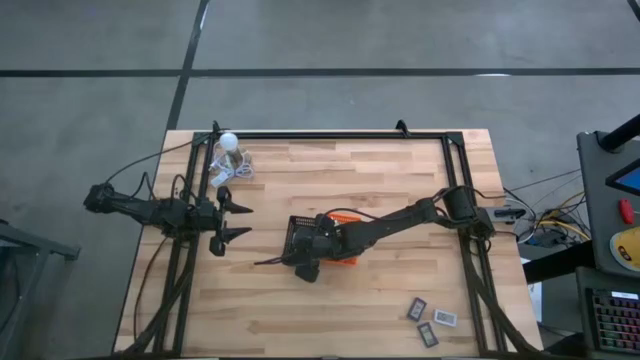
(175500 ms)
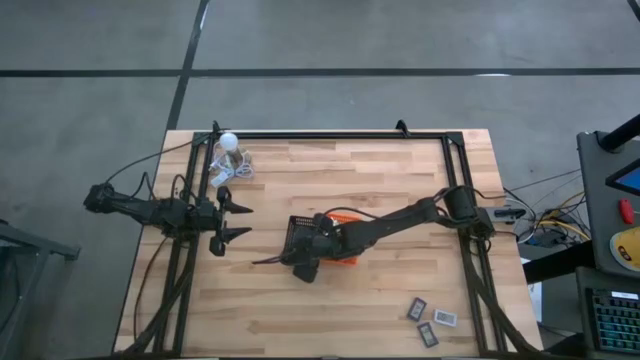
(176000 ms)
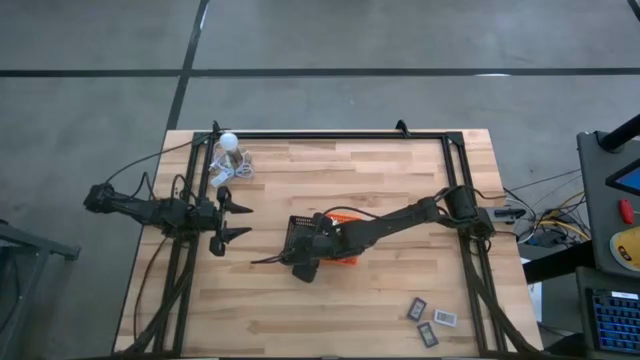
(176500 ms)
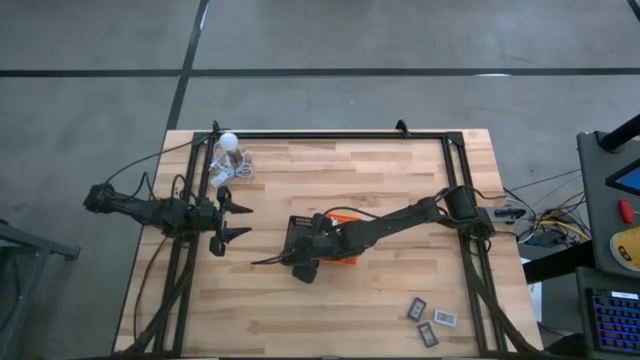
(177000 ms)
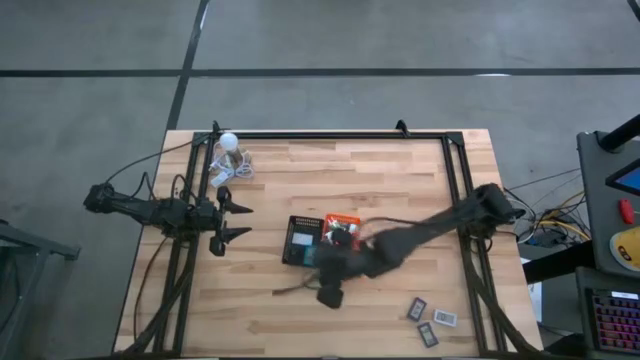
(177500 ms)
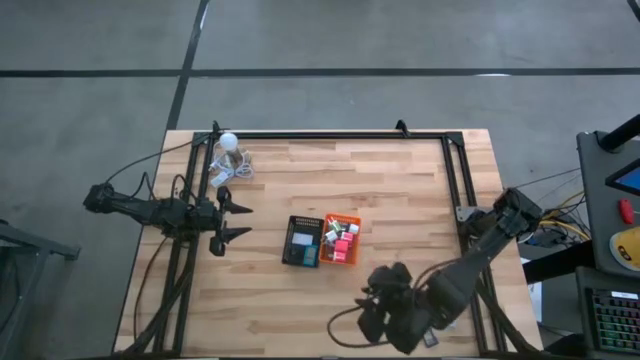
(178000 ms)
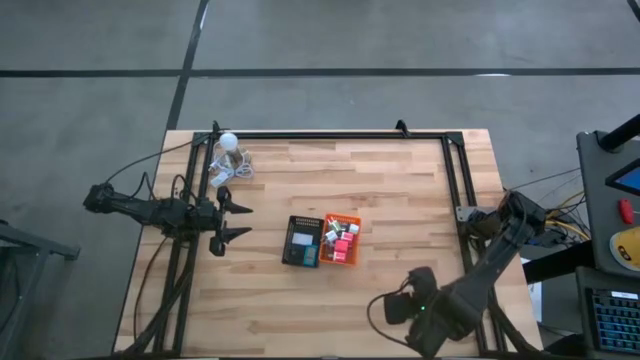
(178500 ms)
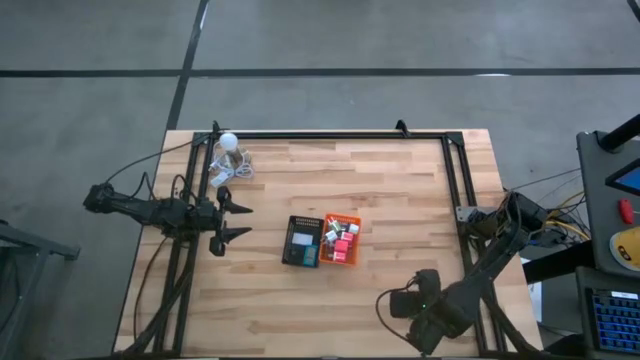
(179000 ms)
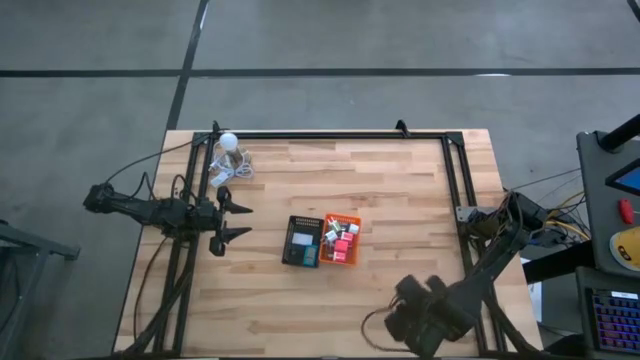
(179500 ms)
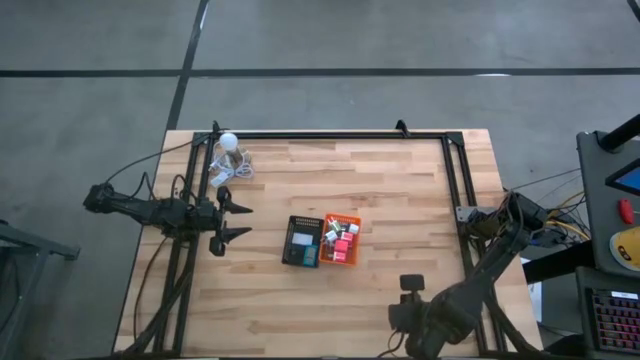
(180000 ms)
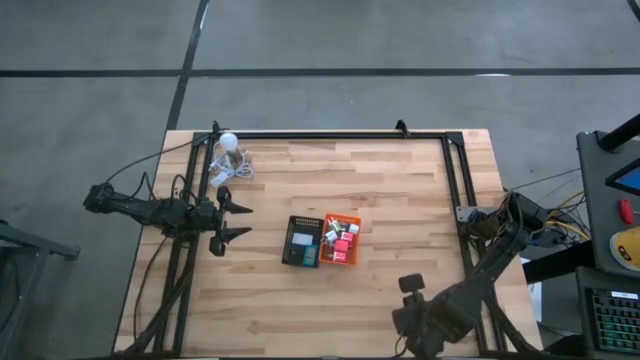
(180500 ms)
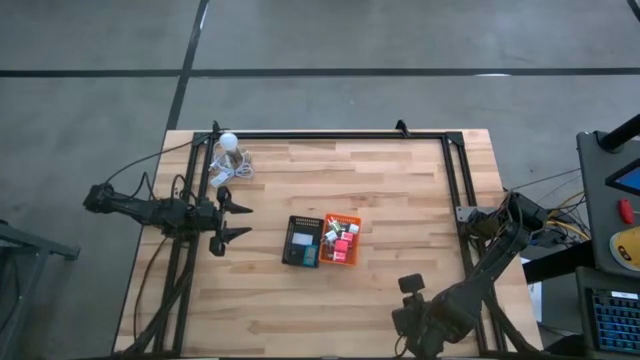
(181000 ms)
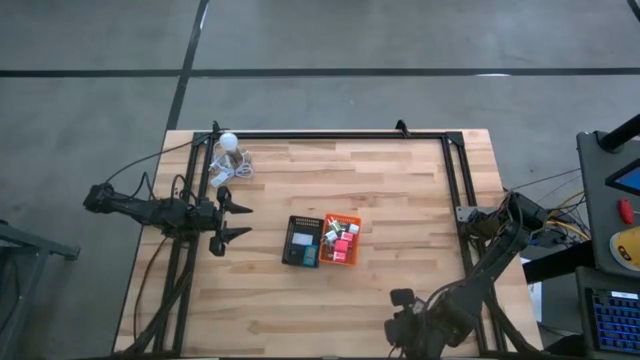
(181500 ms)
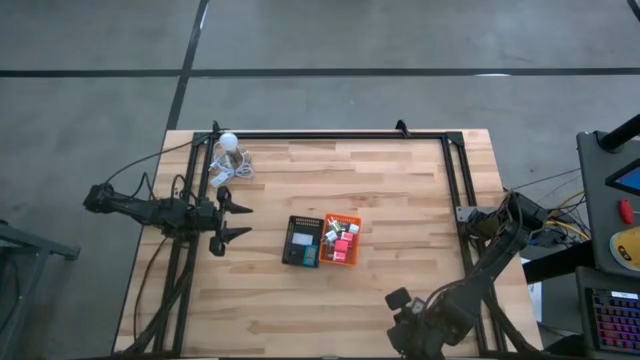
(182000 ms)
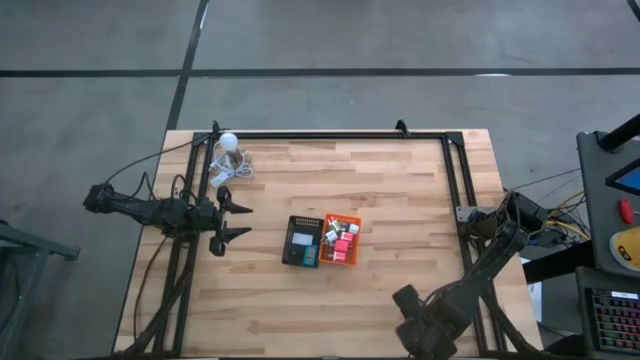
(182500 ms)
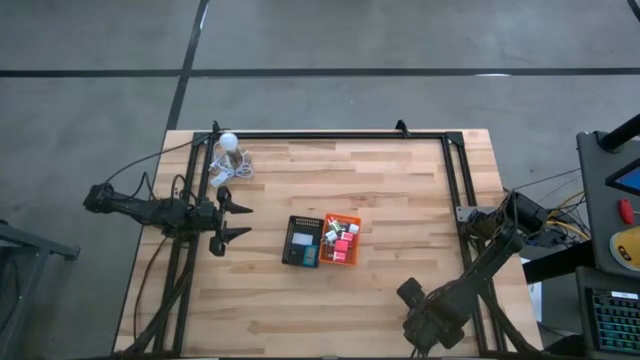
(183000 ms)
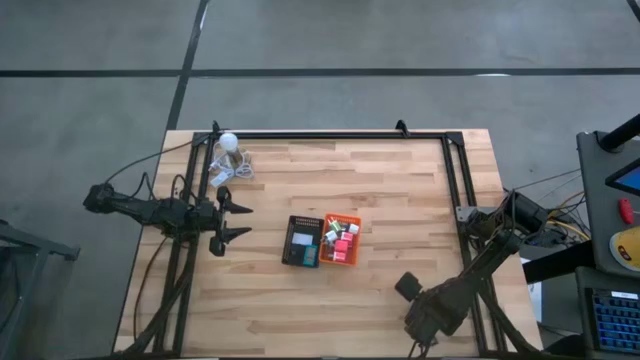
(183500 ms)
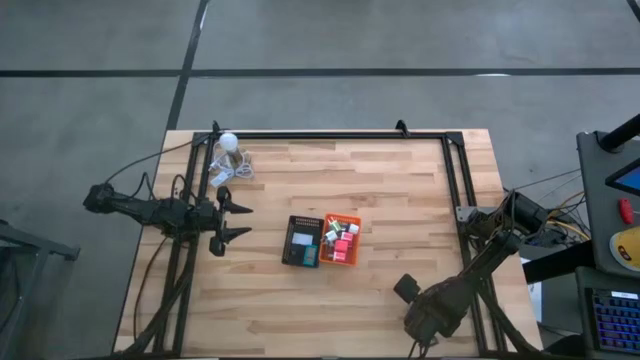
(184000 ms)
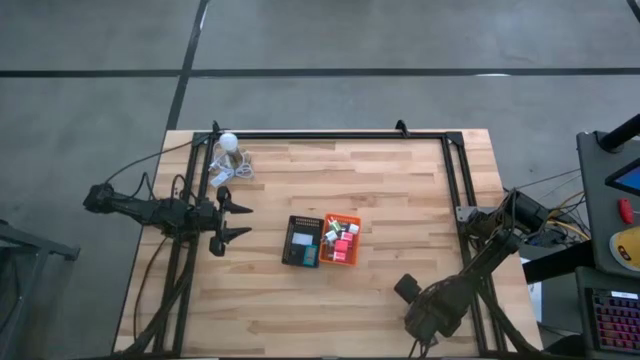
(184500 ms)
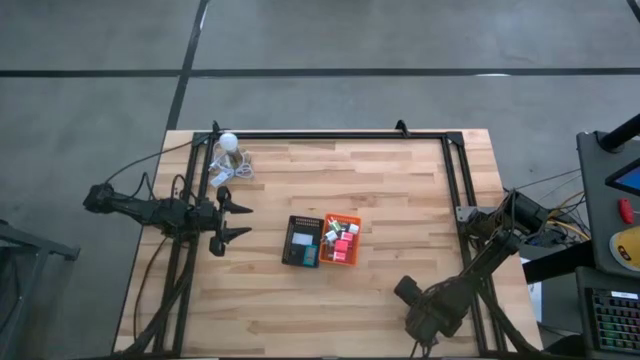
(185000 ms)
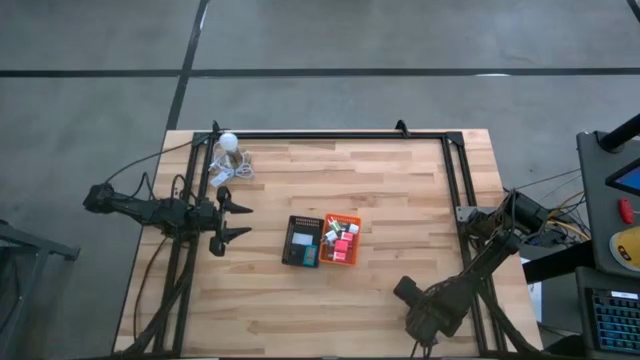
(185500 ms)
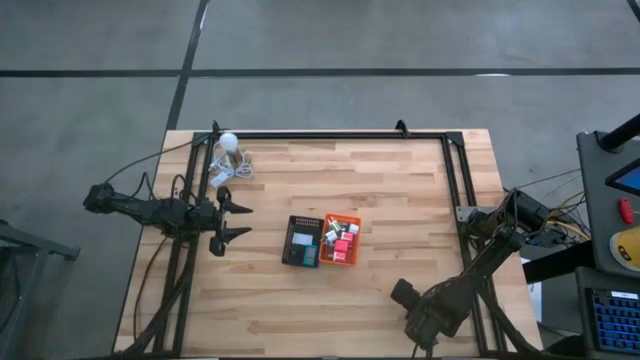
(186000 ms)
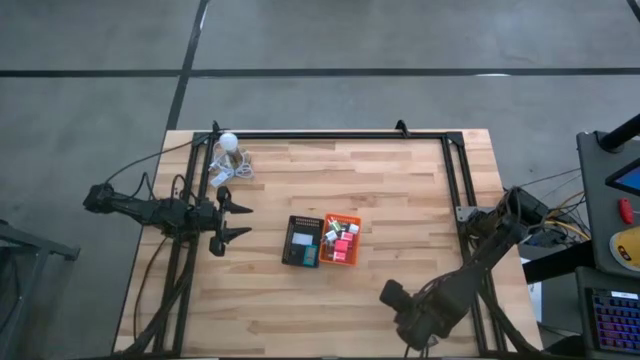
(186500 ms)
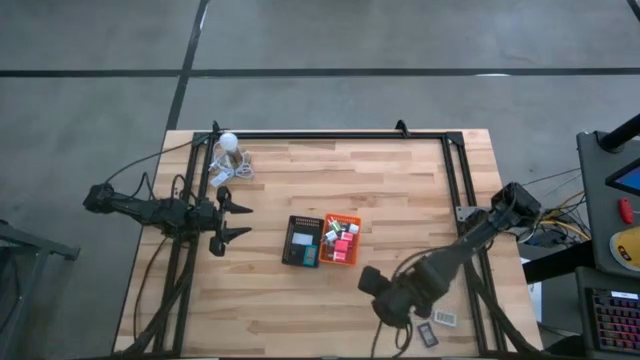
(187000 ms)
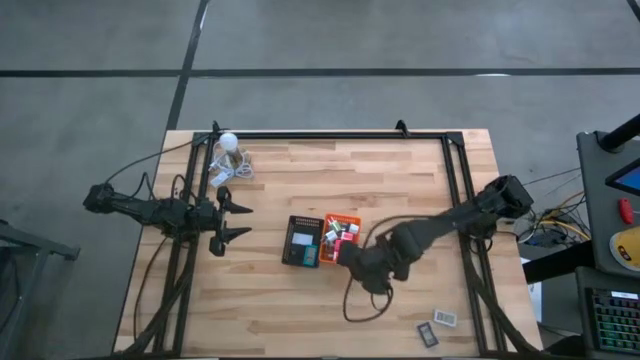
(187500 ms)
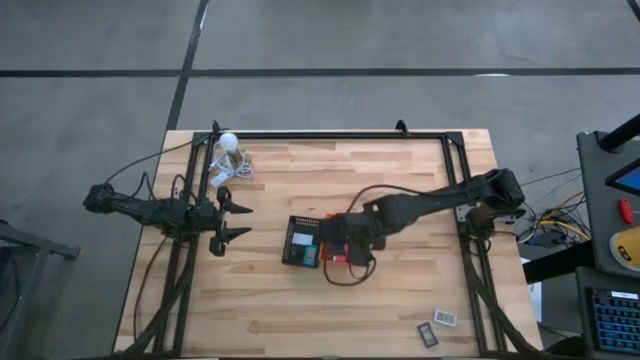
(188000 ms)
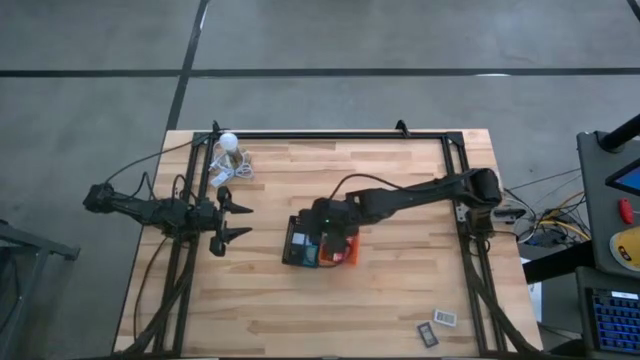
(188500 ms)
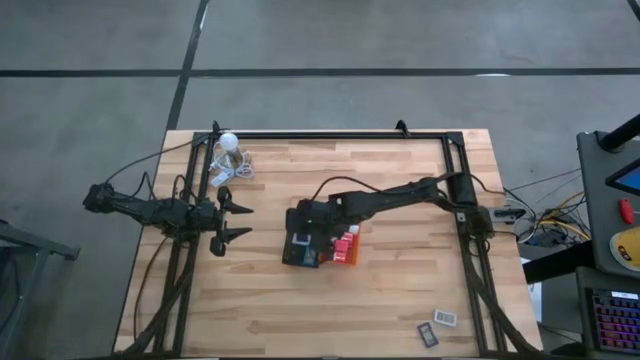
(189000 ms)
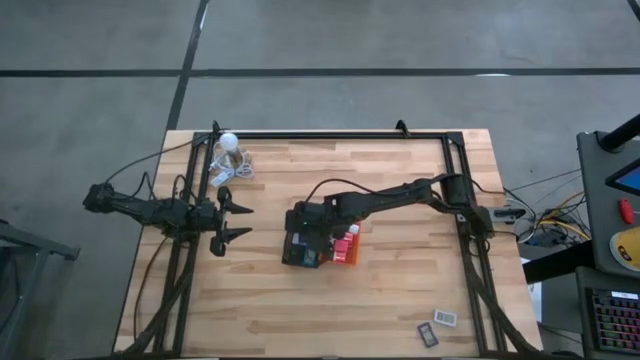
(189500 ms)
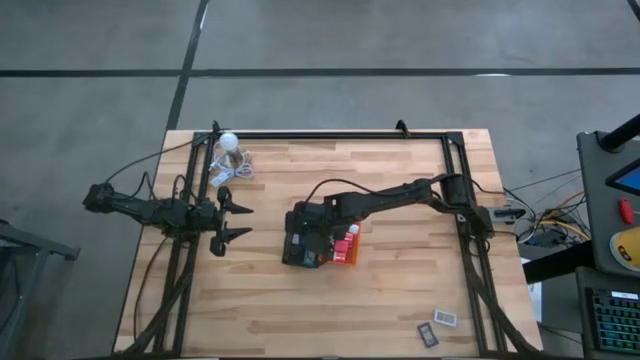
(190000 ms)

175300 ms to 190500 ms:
Task: Pick & Place Office items
Put the top dark blue timer into the black bin

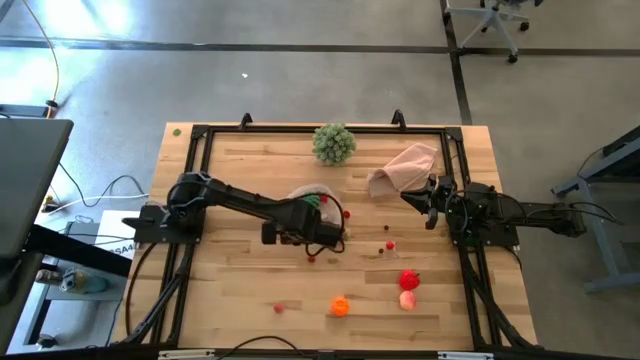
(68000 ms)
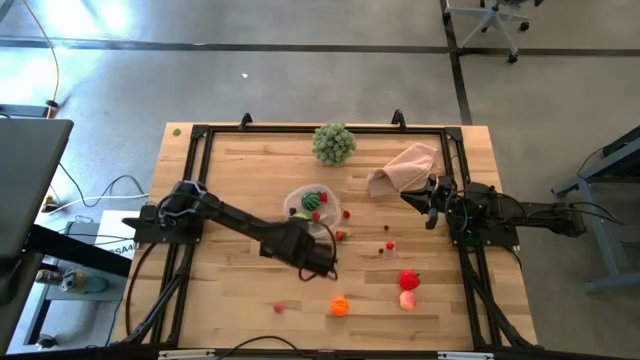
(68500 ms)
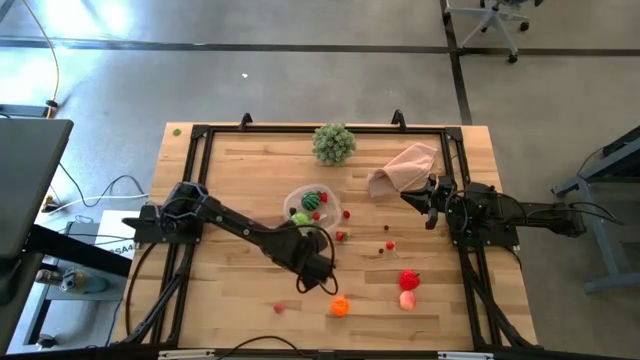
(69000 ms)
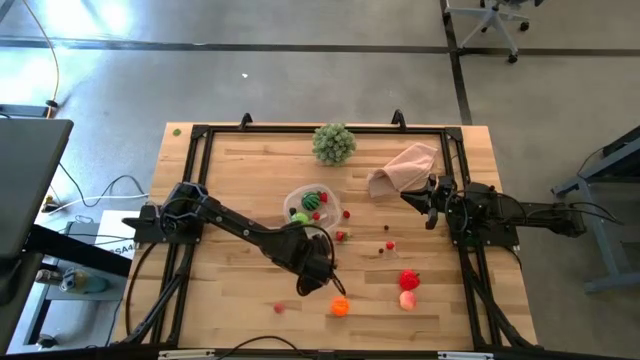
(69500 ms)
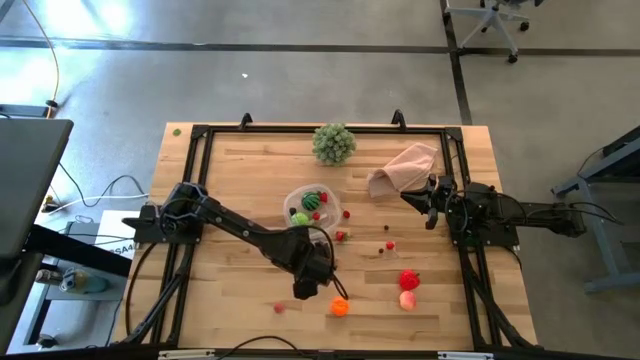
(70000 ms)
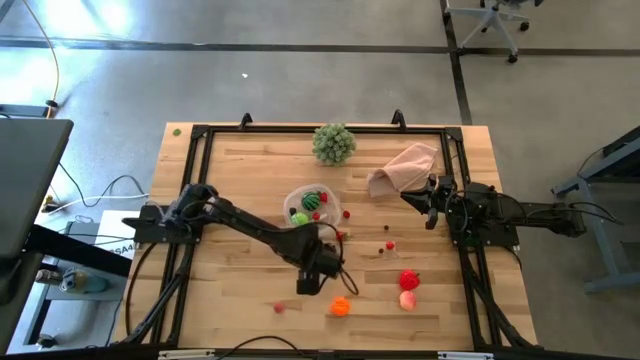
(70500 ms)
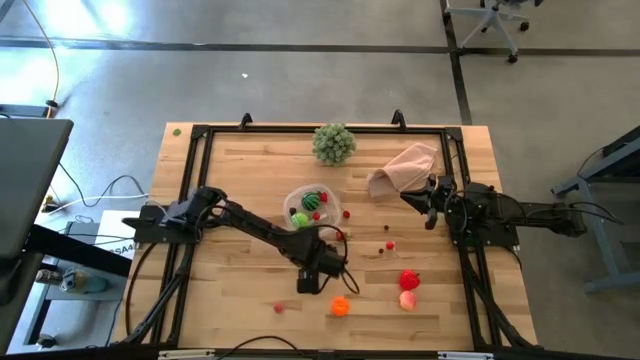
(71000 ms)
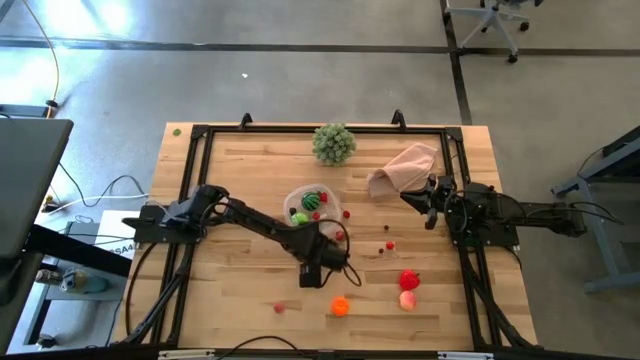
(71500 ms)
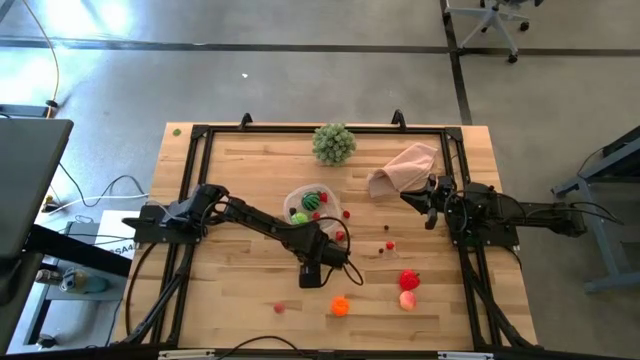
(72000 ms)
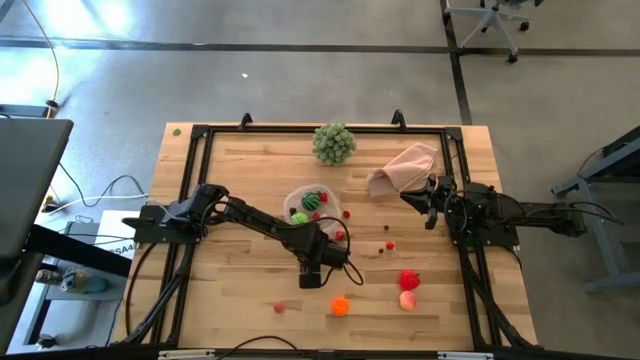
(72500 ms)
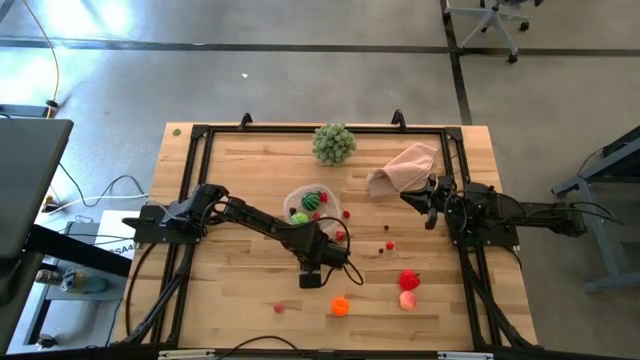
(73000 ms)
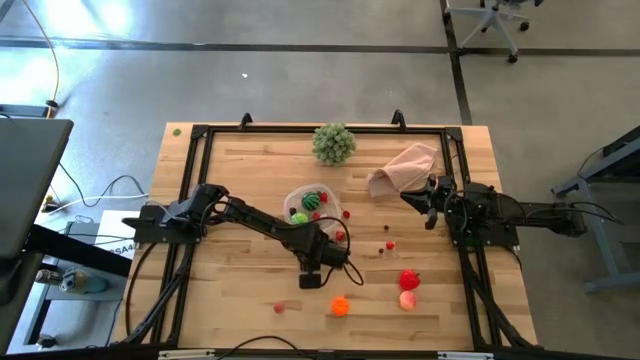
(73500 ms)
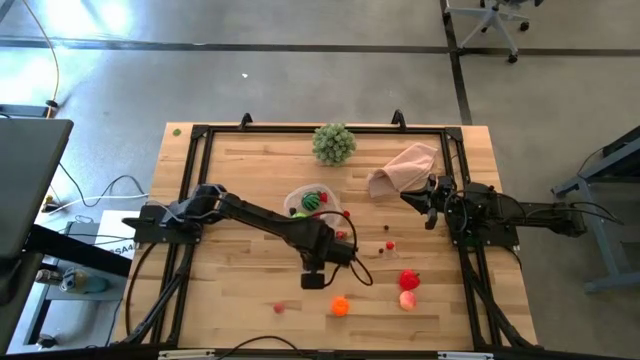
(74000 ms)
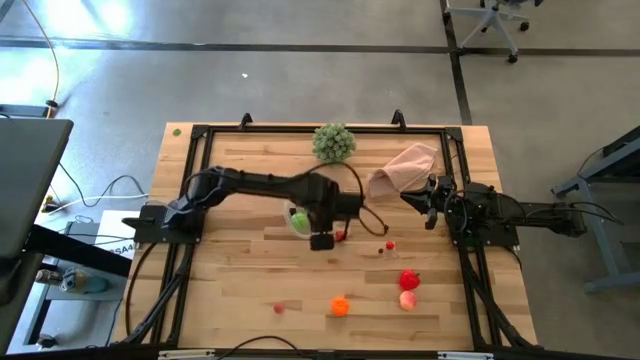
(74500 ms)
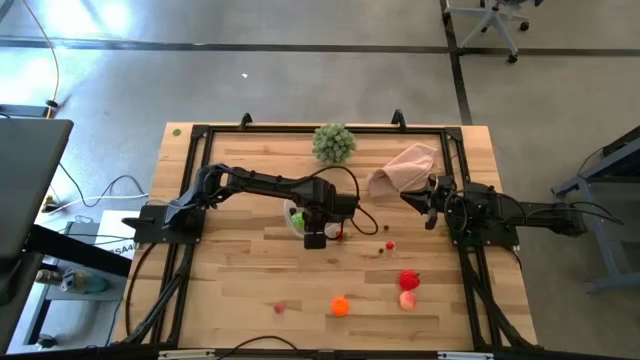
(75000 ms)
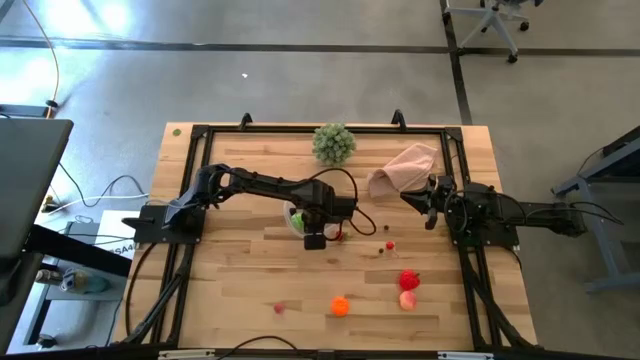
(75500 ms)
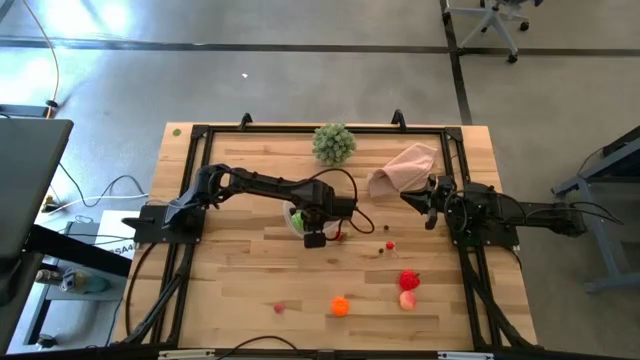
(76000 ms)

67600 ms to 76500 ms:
Task: Pick and placing Produce into tupperware
Put the red cherry into the transparent bin
